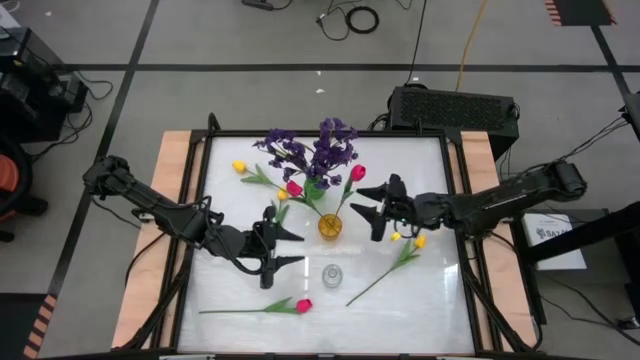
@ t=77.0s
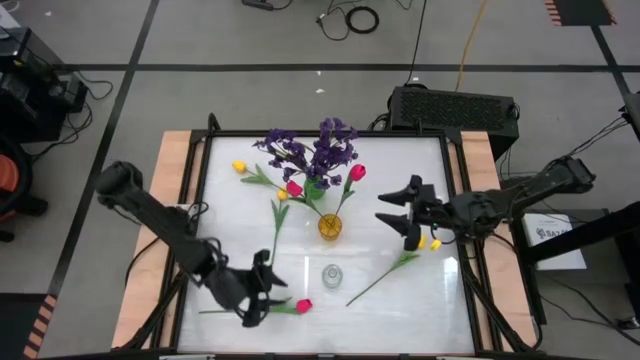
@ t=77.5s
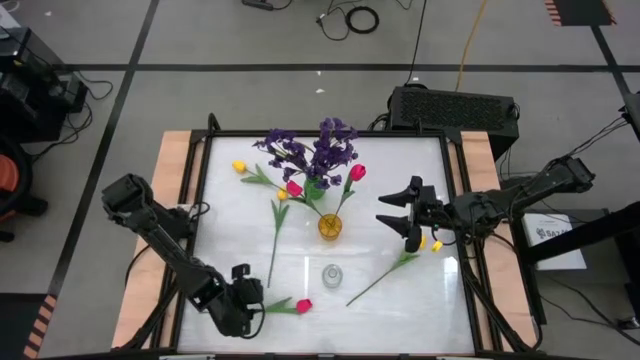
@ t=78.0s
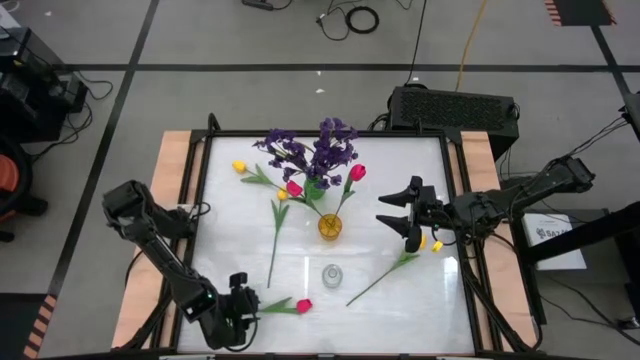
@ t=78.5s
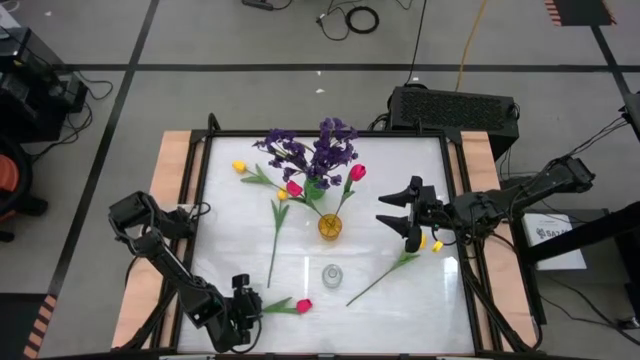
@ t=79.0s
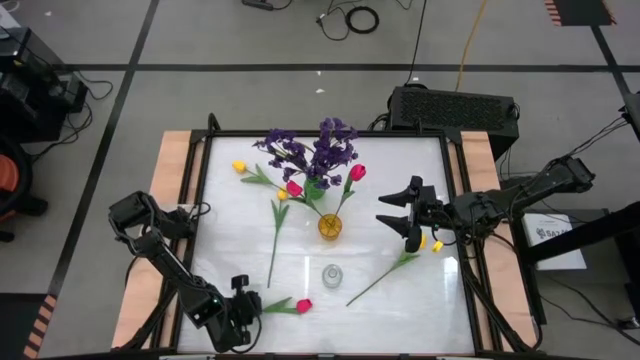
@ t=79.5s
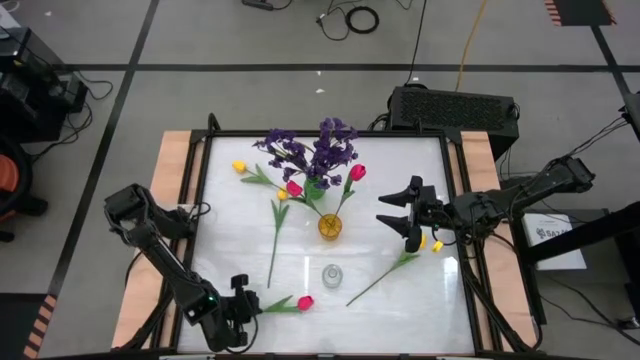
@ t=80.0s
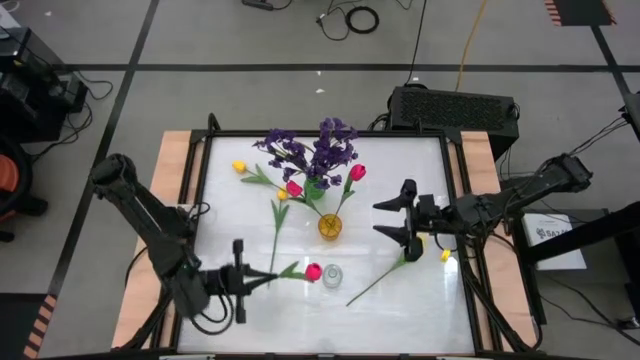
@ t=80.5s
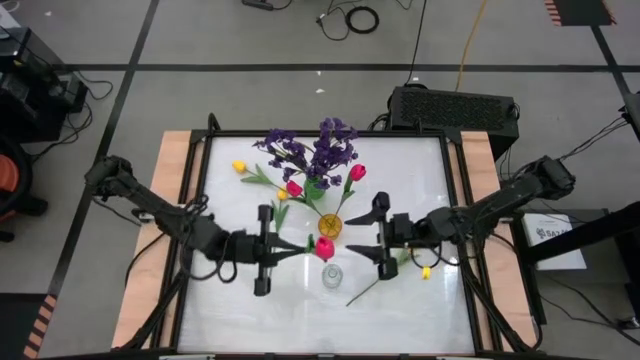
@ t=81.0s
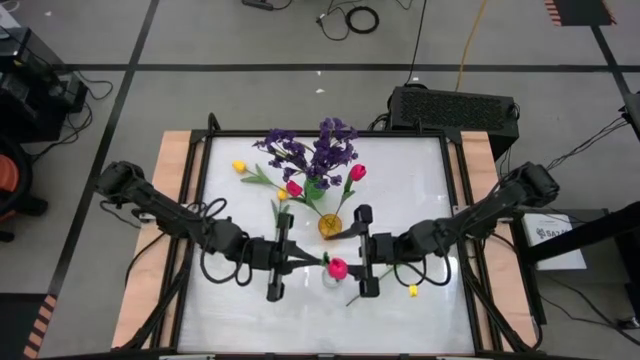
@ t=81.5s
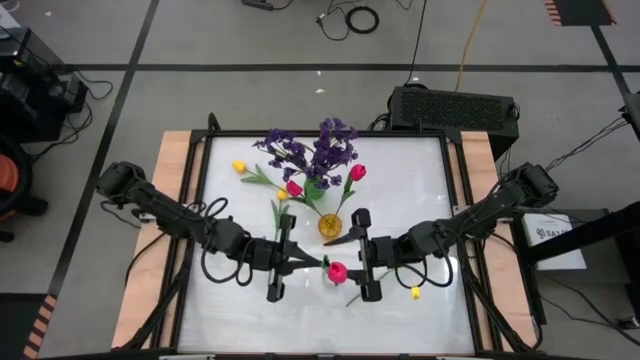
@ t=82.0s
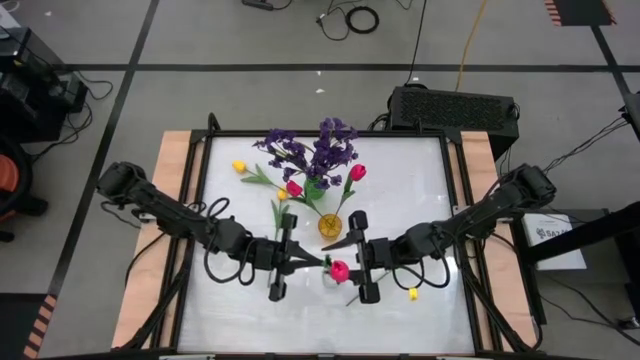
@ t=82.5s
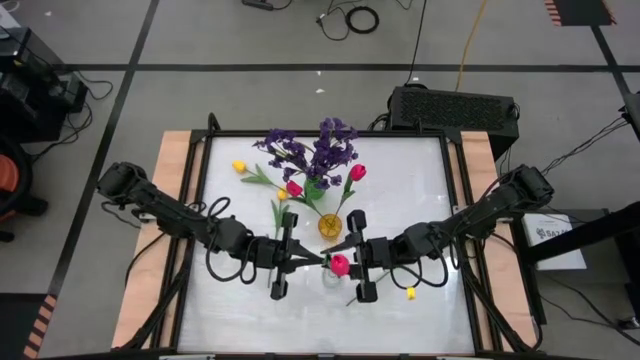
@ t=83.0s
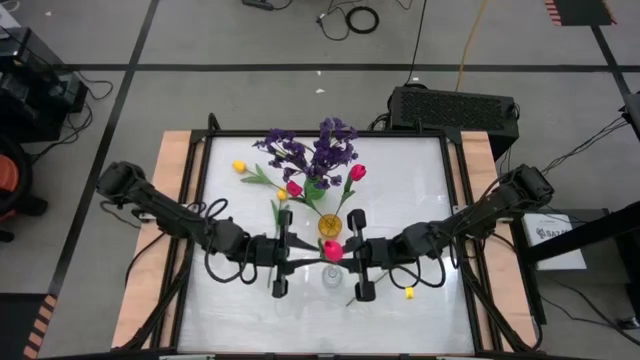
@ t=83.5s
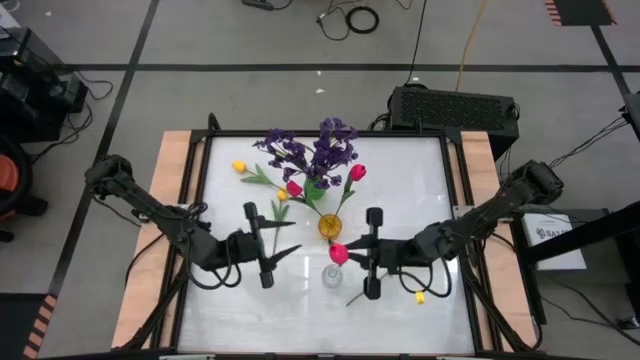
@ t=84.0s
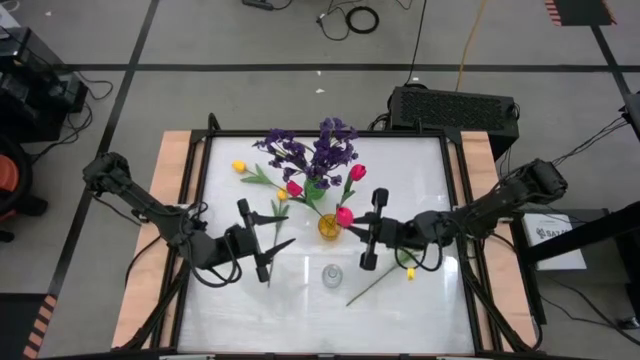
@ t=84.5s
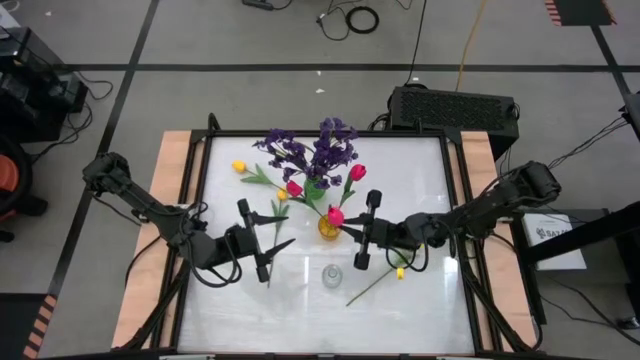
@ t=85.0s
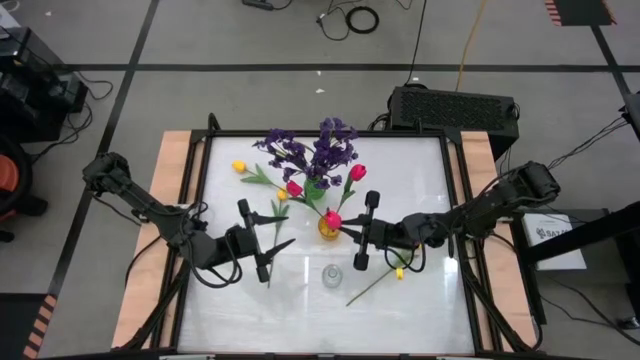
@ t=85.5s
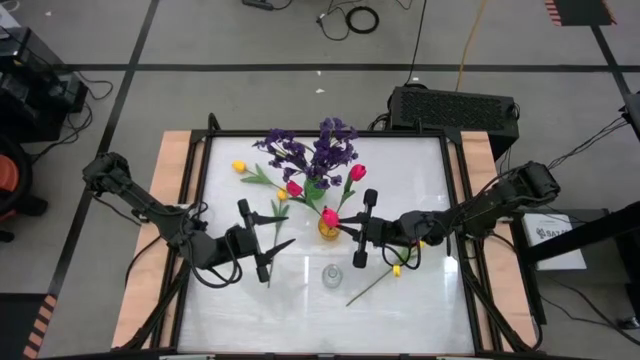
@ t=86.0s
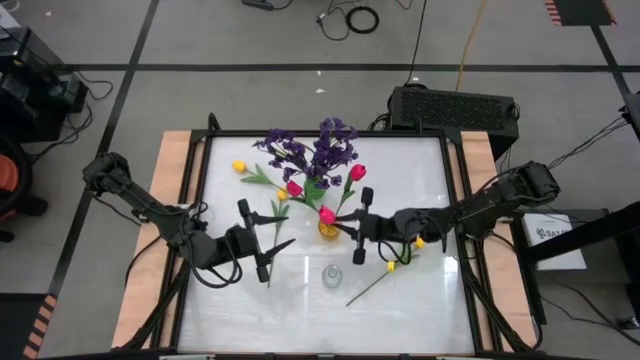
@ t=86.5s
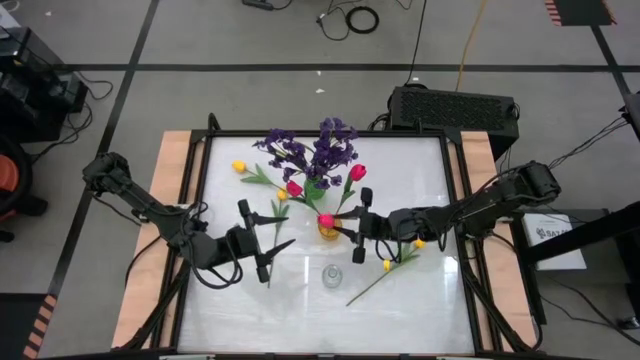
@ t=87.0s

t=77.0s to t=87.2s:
Task: Sort flowers into vase by color
Put the pink flower into the yellow vase

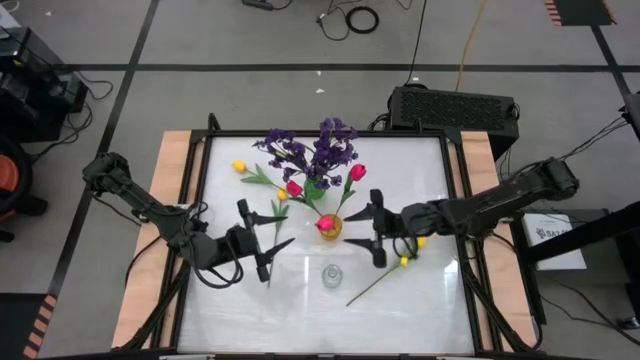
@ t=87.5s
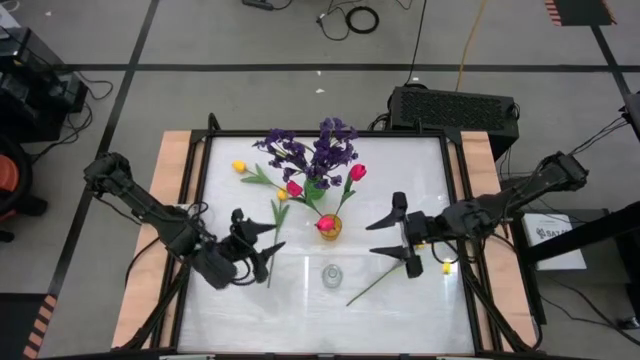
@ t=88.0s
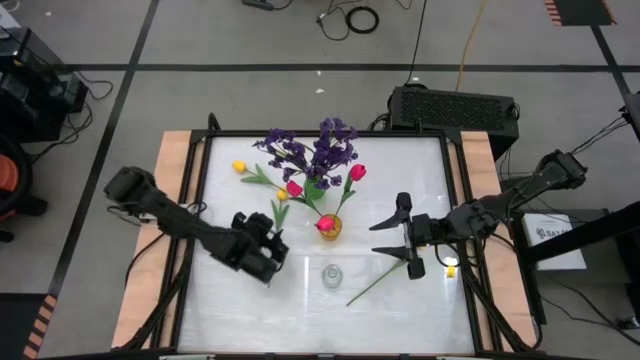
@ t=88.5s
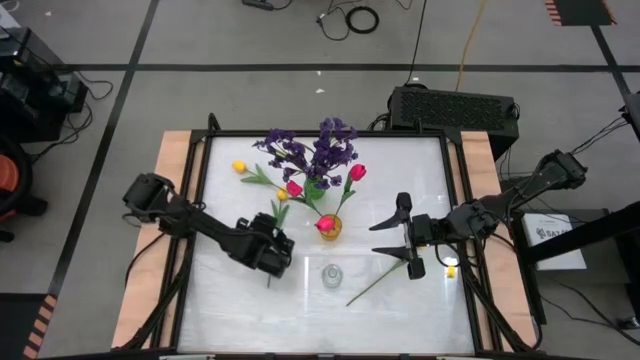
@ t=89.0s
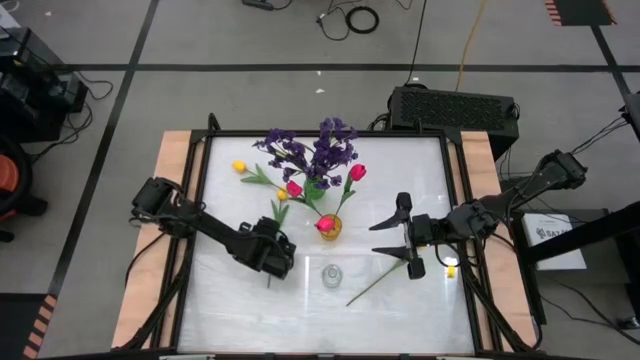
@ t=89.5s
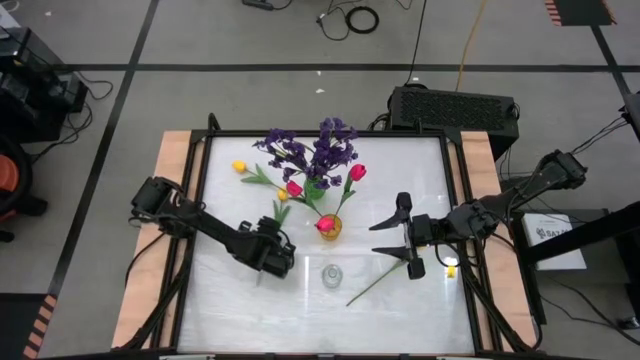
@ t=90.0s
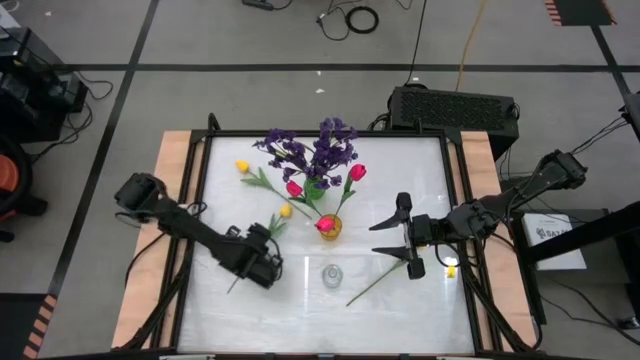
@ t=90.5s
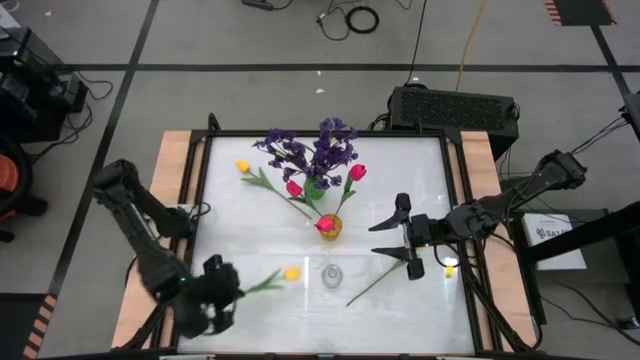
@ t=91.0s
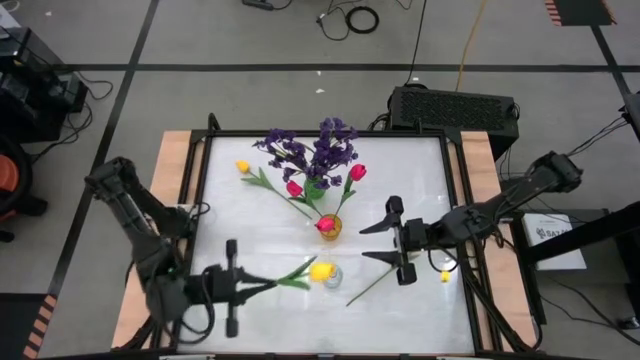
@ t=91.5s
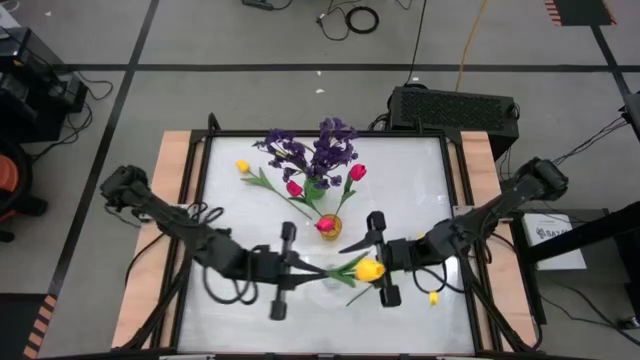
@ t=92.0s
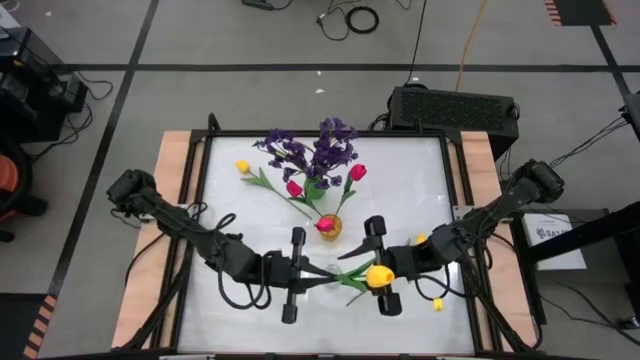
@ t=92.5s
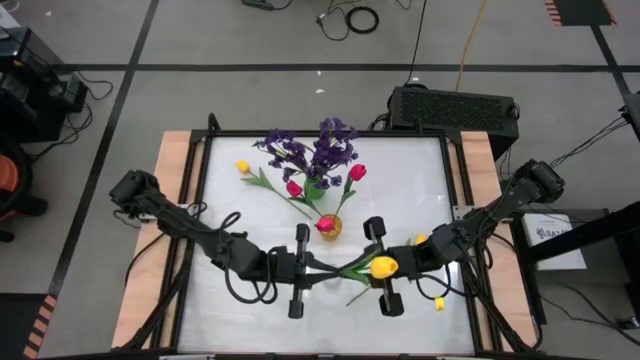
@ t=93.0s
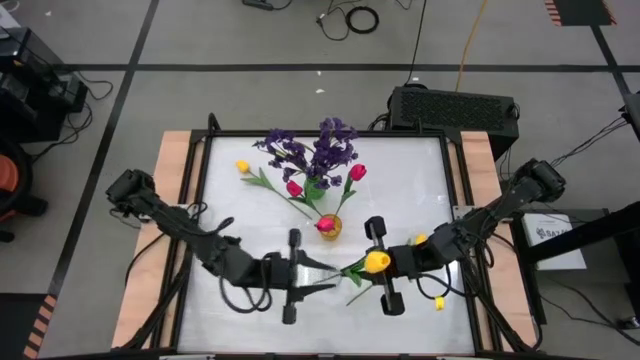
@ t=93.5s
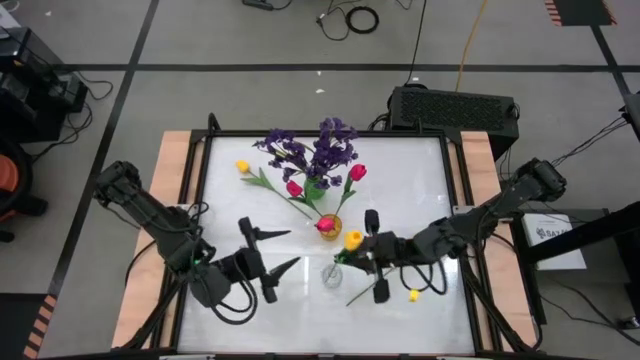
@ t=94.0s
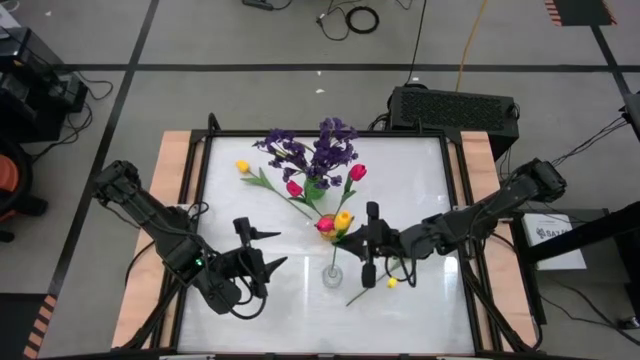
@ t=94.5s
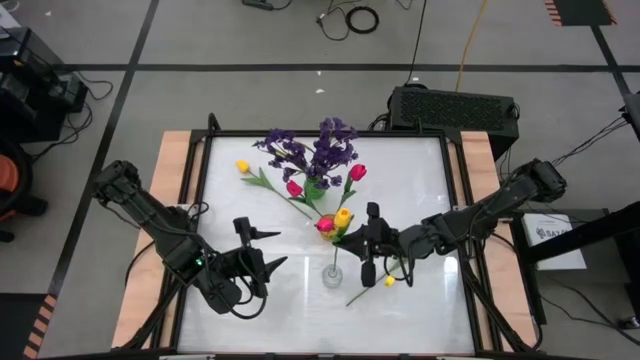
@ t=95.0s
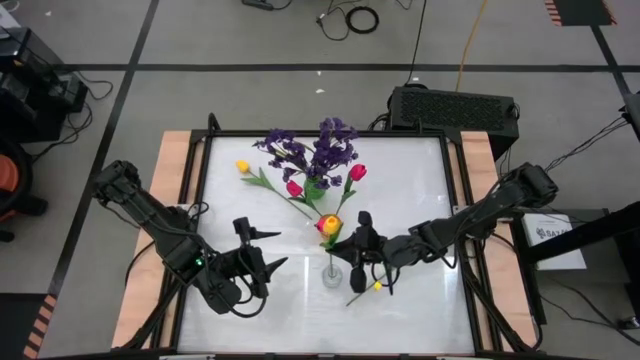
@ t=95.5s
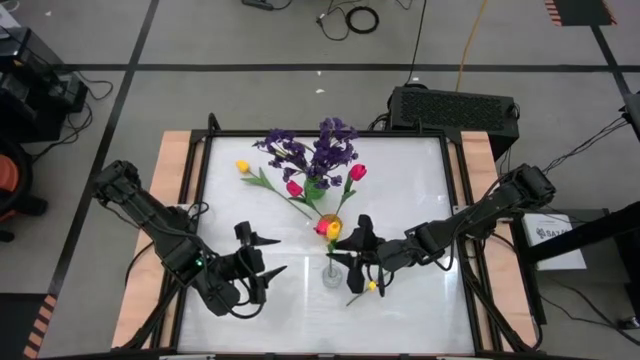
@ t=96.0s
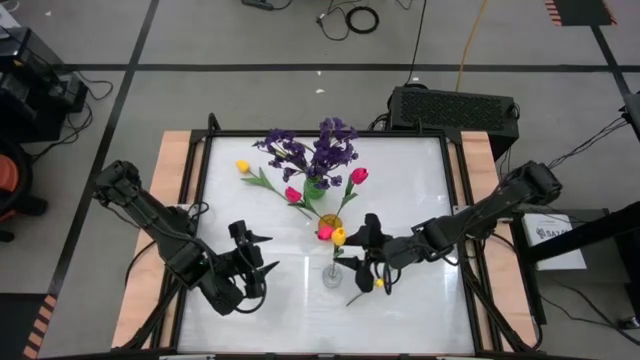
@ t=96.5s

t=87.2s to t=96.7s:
Put the middle yellow flower into the transparent vase
